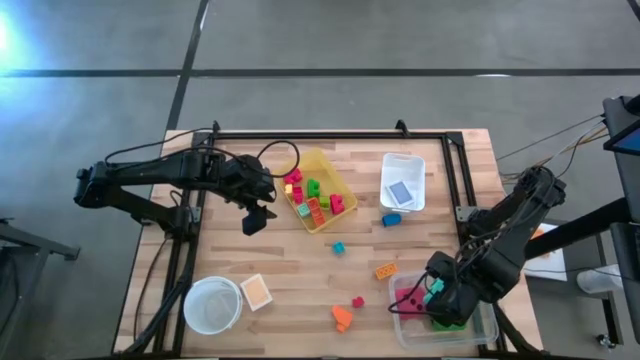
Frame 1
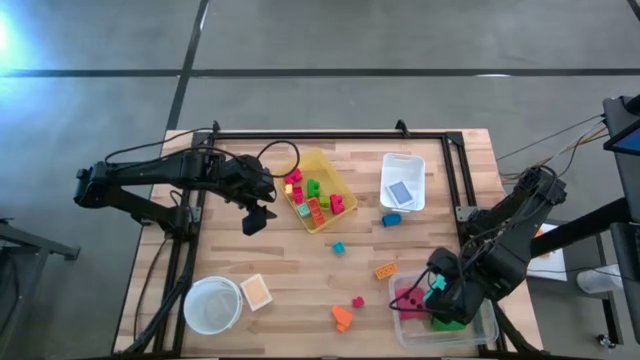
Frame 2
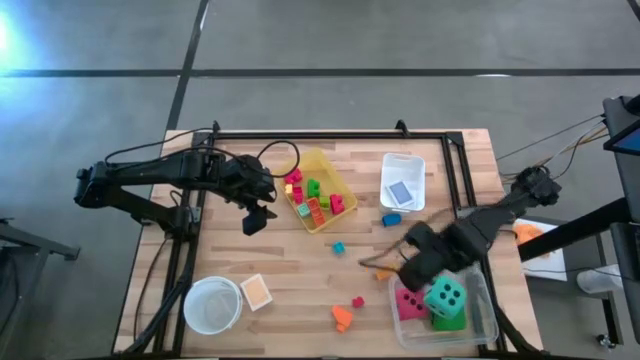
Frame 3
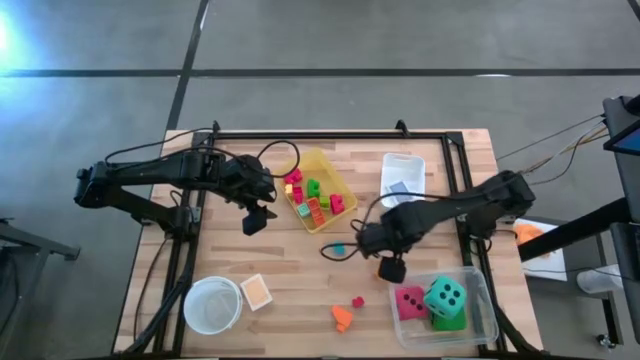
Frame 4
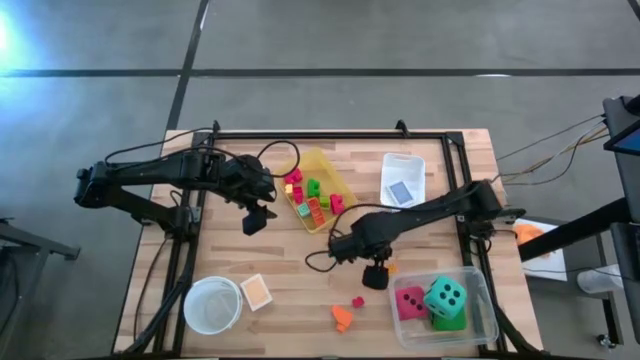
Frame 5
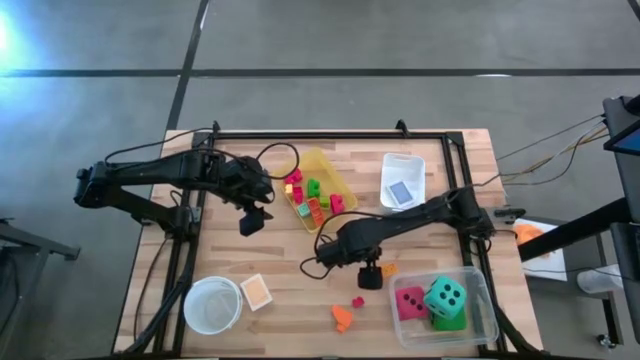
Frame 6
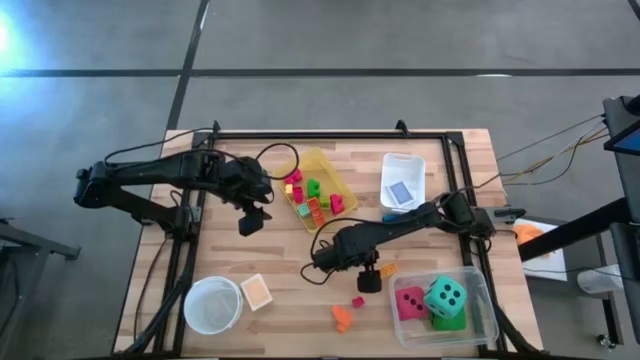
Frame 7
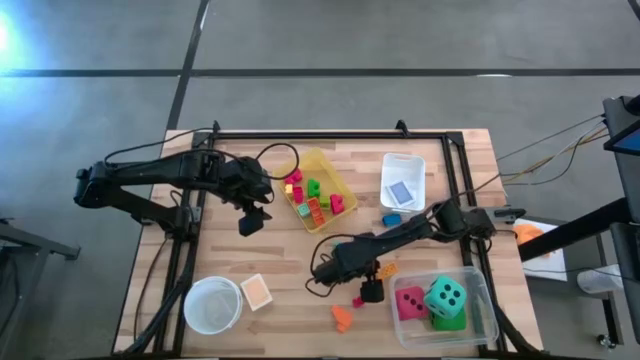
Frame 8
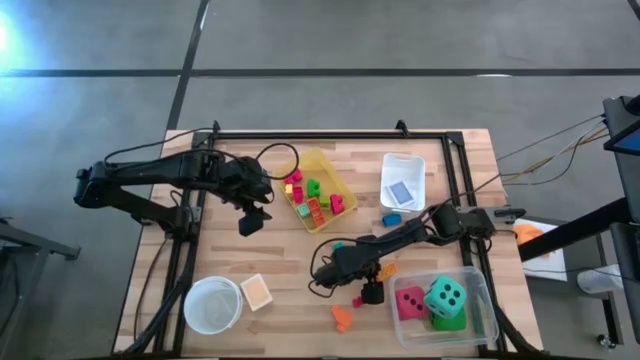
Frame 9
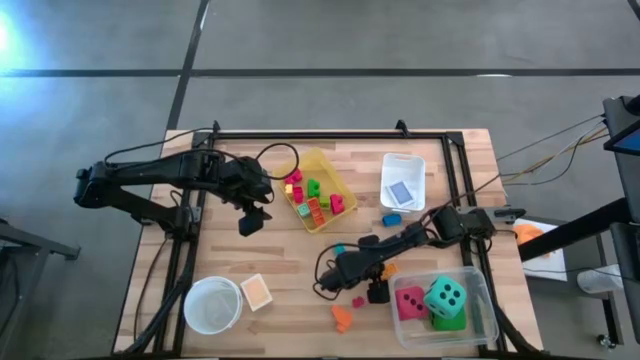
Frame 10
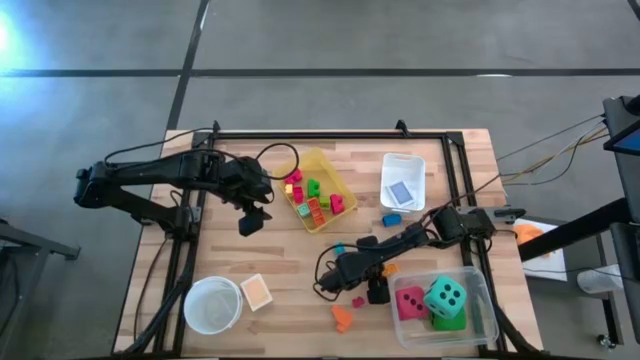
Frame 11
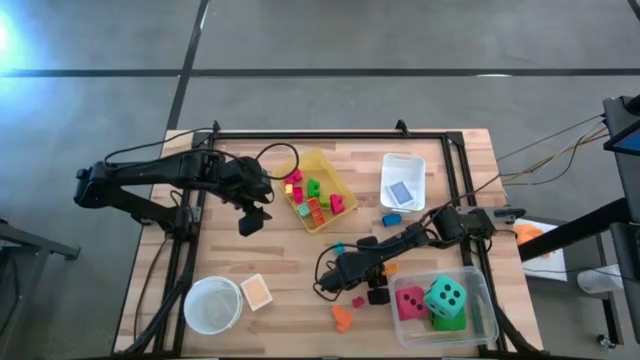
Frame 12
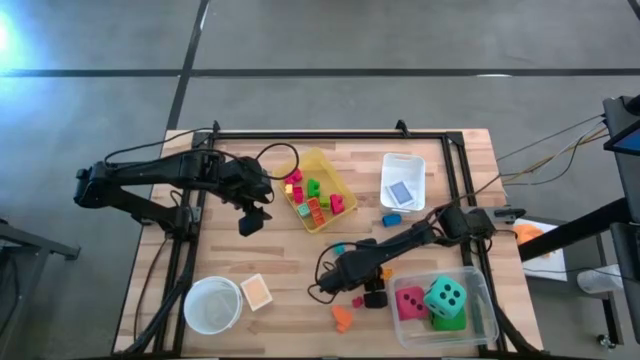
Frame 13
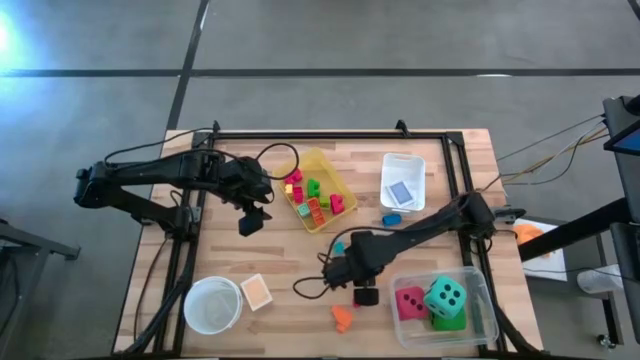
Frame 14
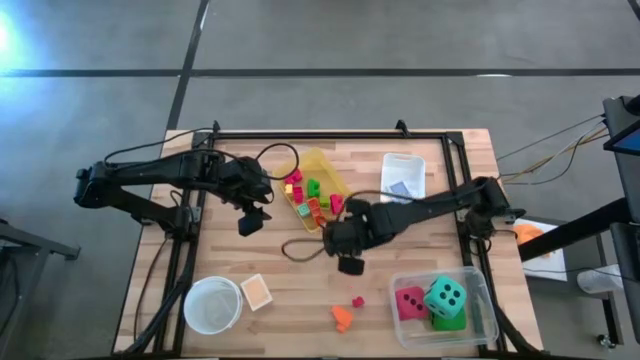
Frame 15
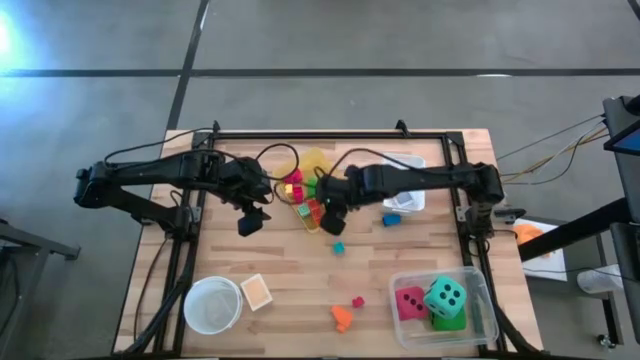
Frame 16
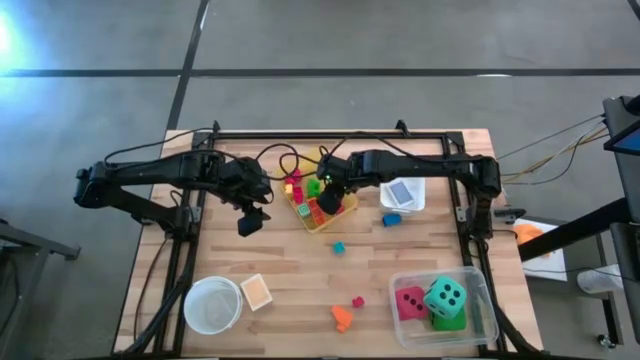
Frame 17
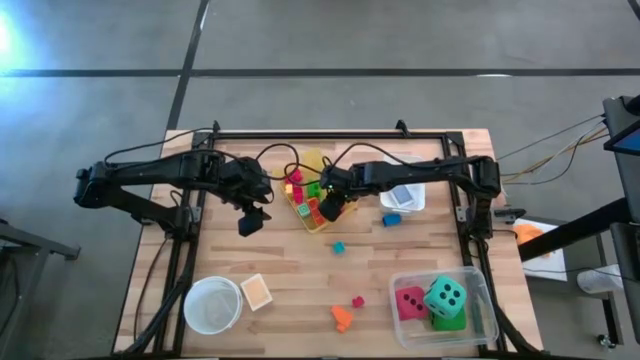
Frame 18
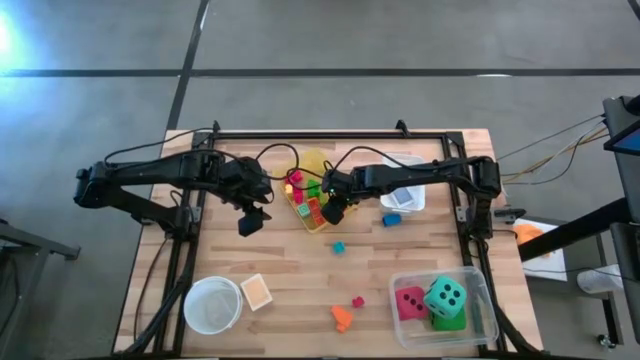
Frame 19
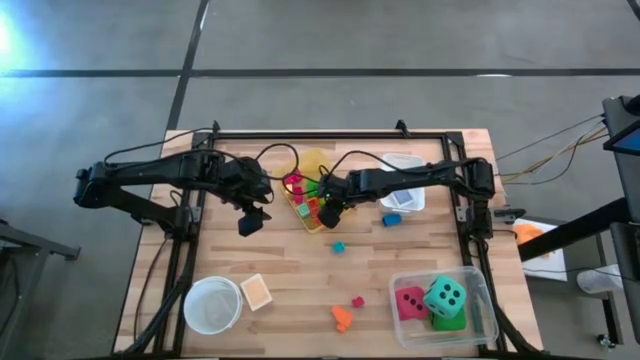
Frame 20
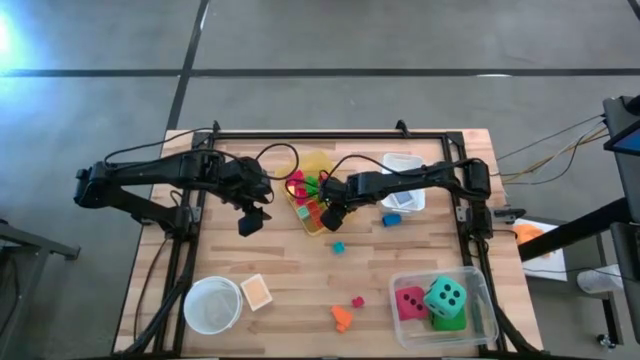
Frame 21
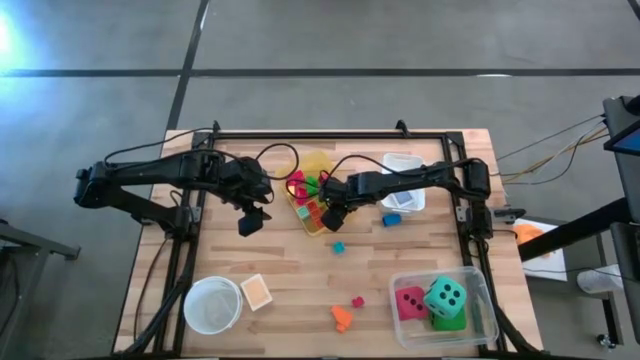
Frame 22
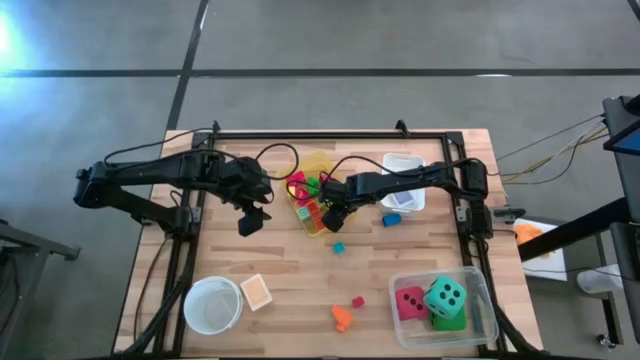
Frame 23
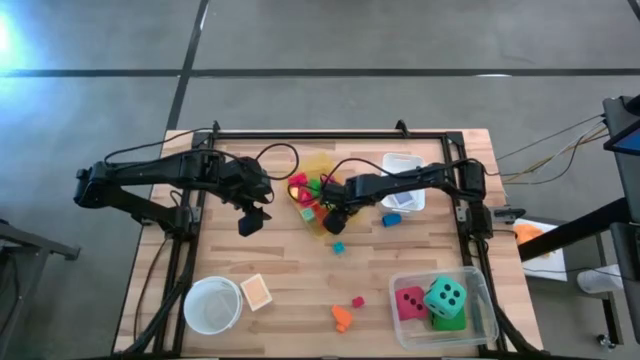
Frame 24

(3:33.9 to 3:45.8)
Task: Pick & Place Toys
Put the yellow game piece into the yellow bin

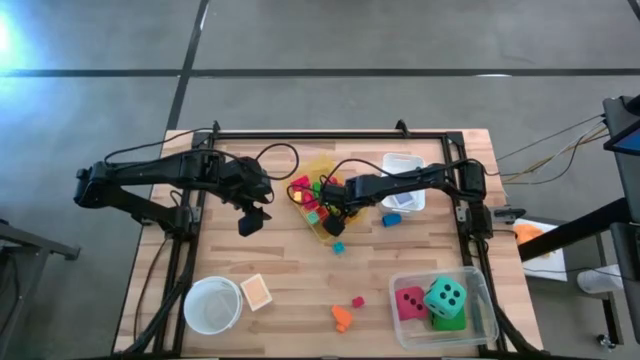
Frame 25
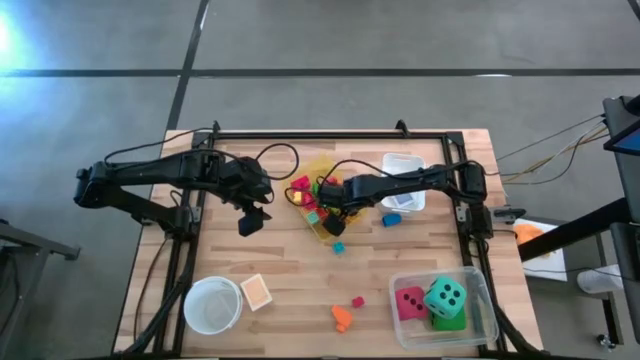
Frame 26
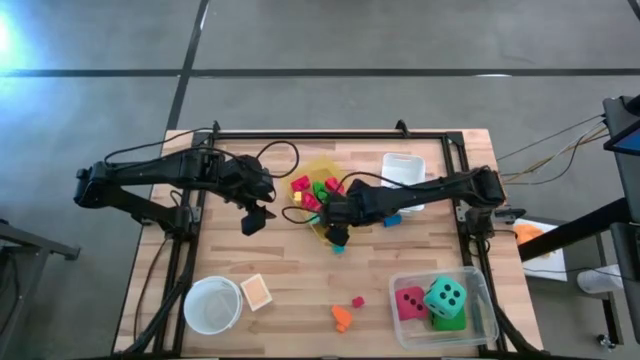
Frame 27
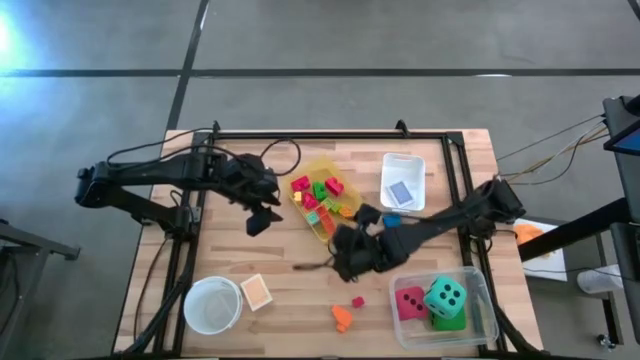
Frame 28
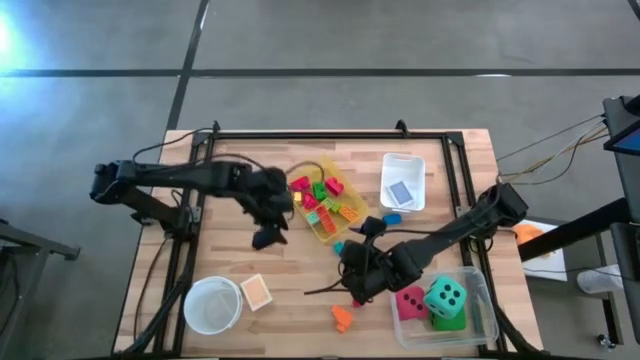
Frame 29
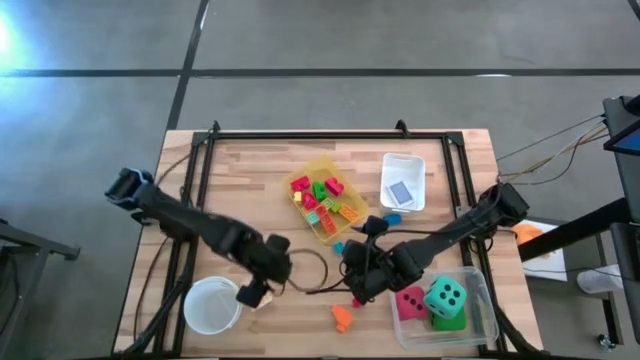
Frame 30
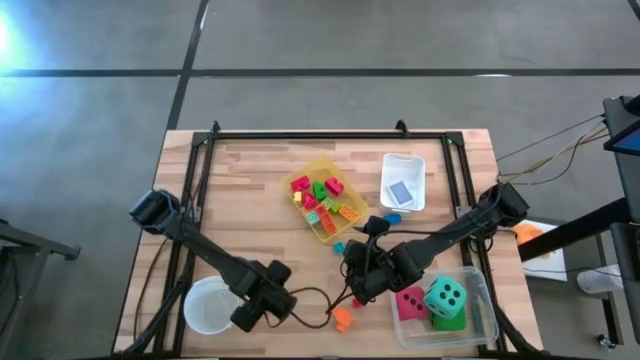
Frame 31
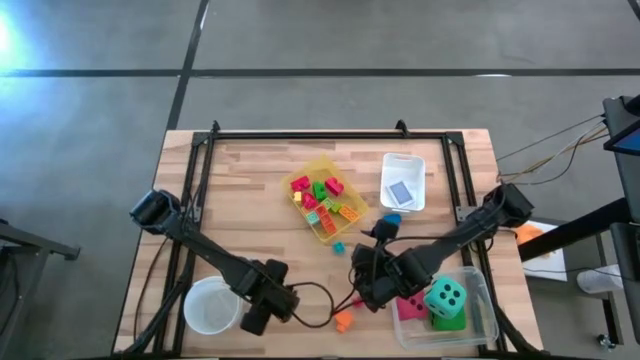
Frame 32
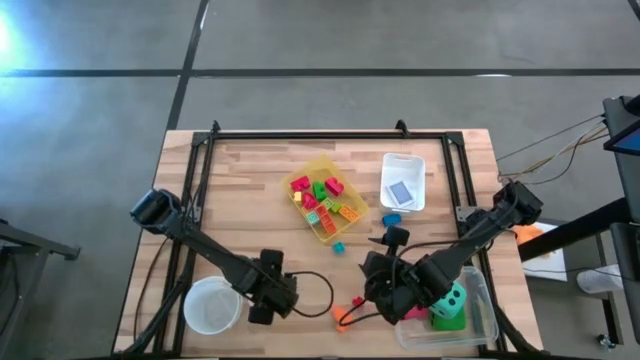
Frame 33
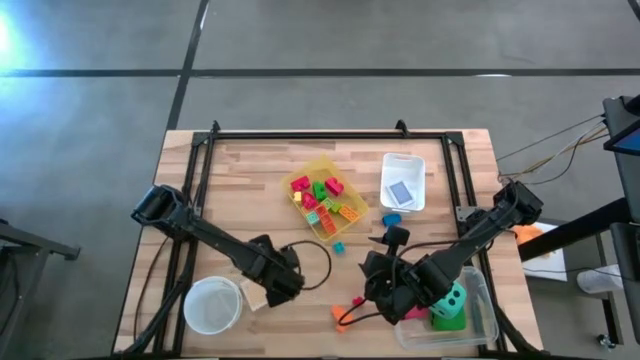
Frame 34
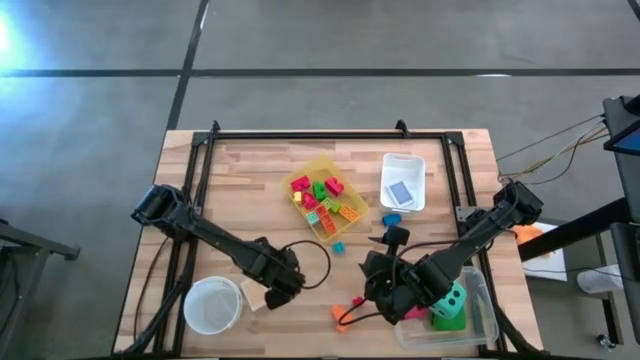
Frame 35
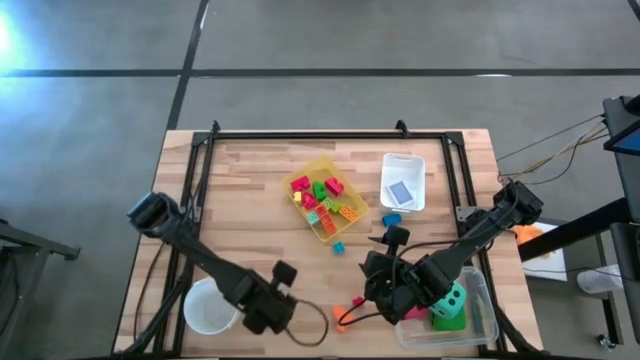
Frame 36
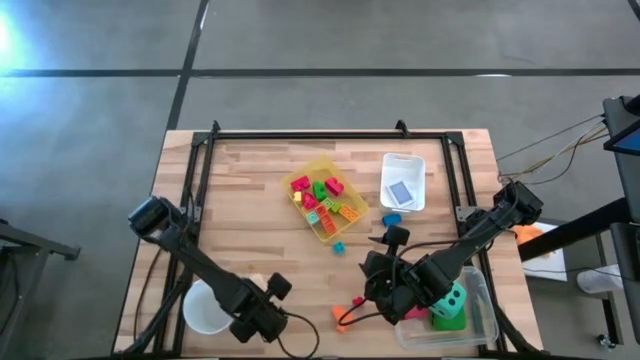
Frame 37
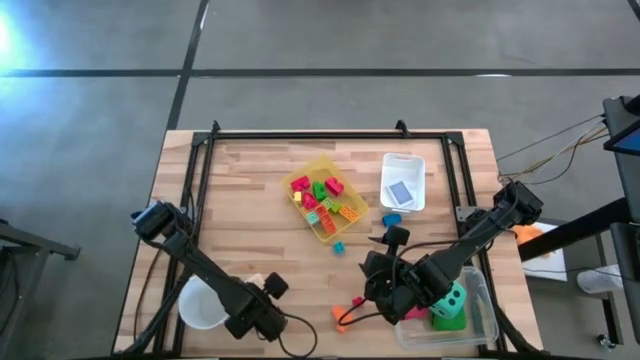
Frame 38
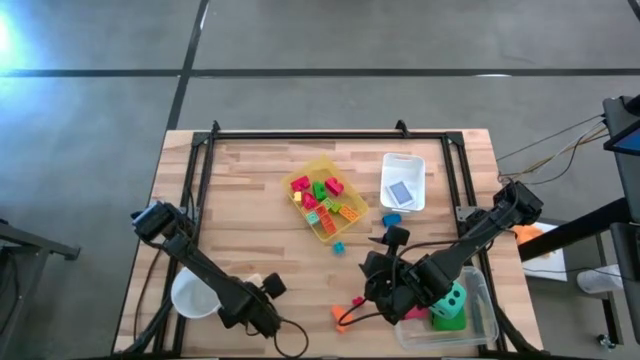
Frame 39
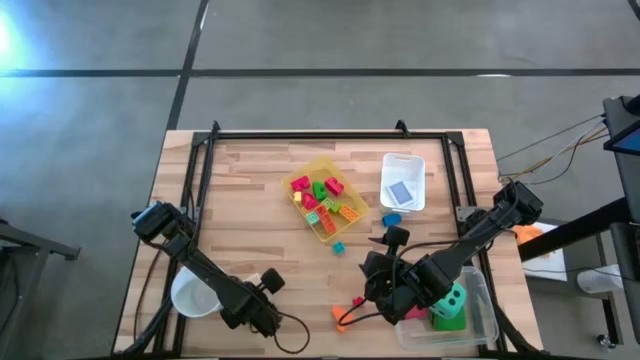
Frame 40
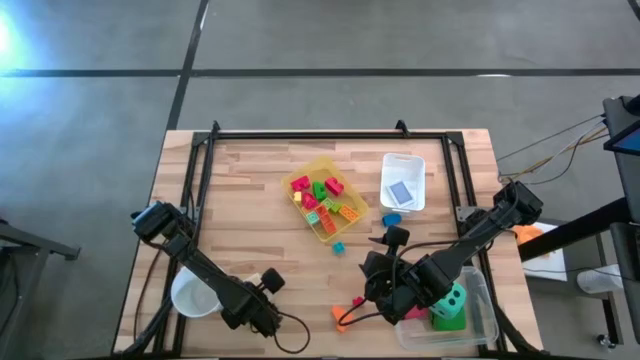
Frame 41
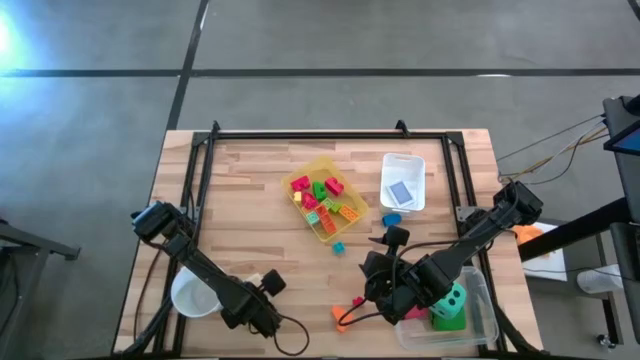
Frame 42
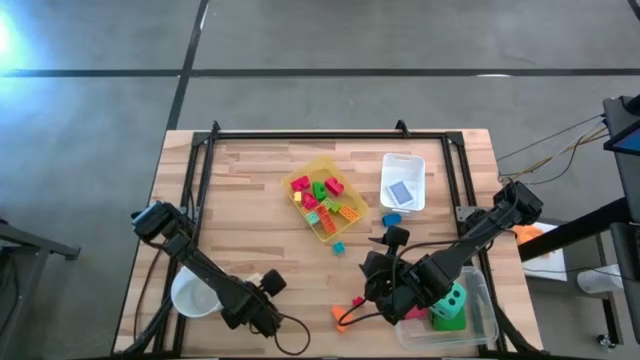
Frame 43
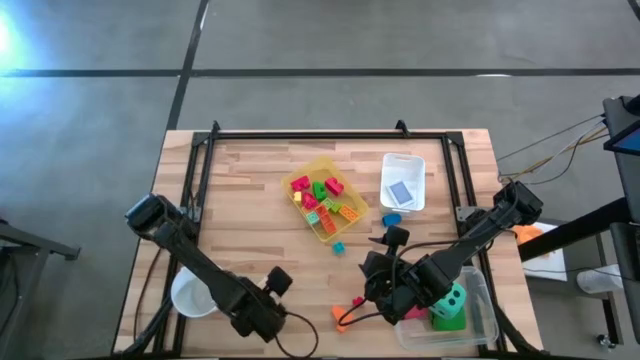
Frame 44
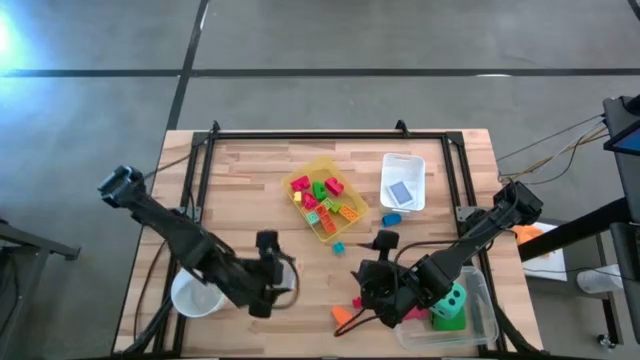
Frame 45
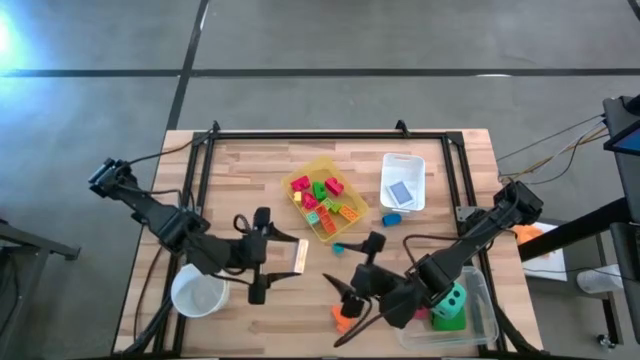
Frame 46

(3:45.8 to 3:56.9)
Put the yellow deck of cards into the white bin
